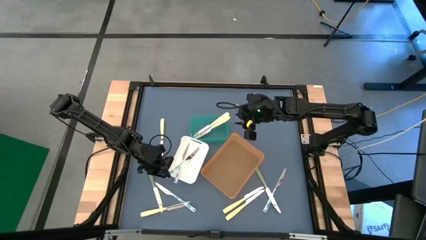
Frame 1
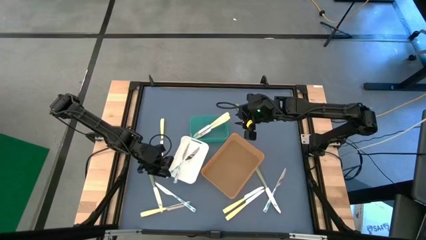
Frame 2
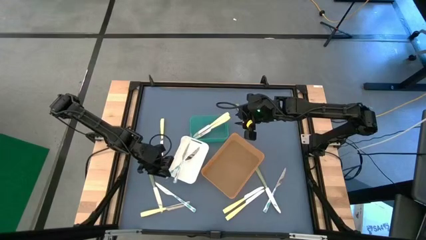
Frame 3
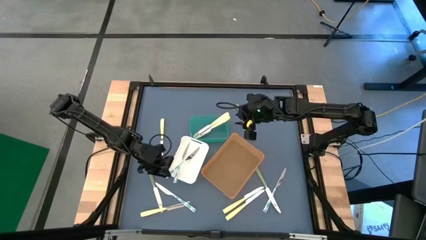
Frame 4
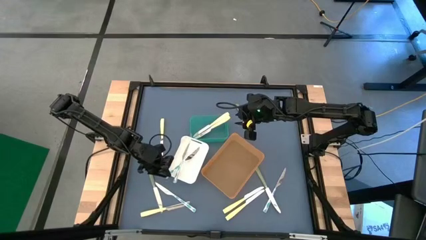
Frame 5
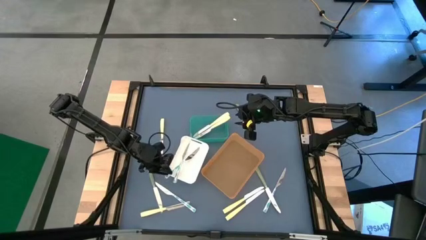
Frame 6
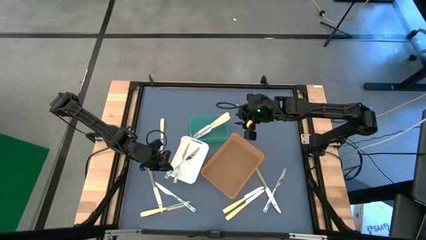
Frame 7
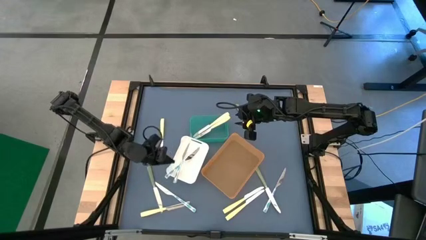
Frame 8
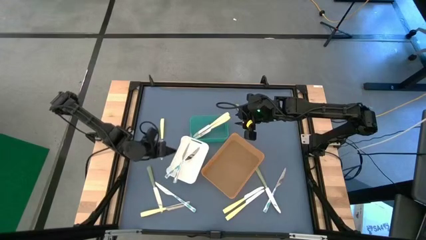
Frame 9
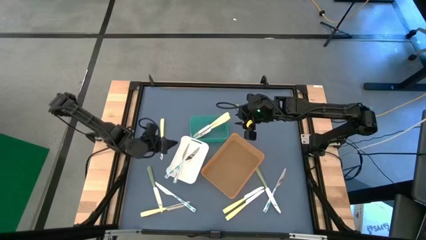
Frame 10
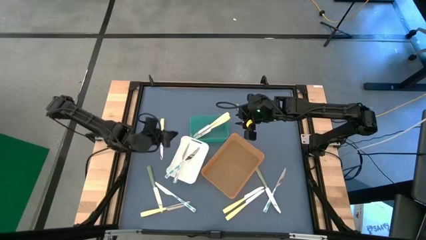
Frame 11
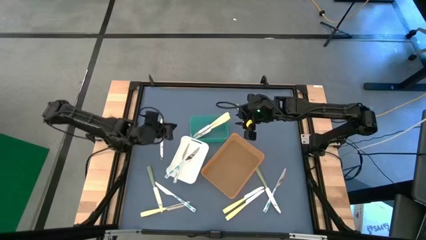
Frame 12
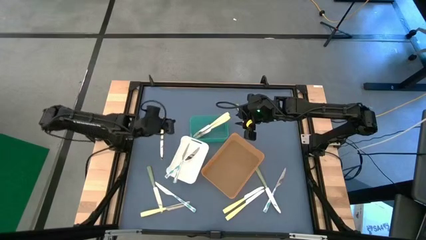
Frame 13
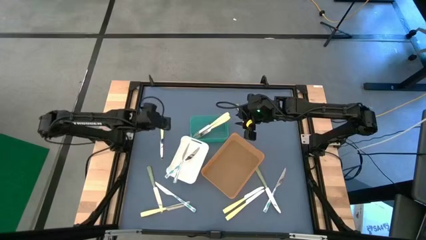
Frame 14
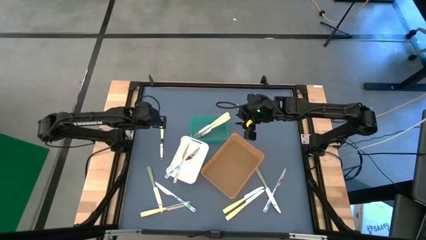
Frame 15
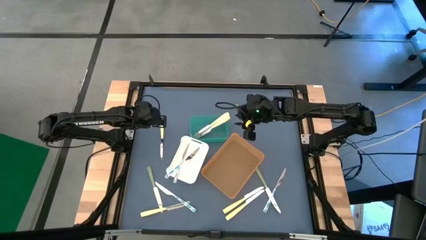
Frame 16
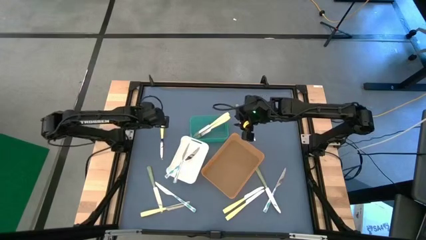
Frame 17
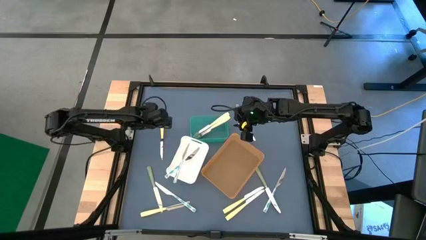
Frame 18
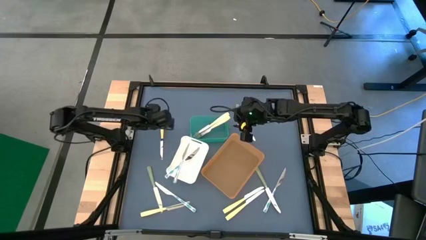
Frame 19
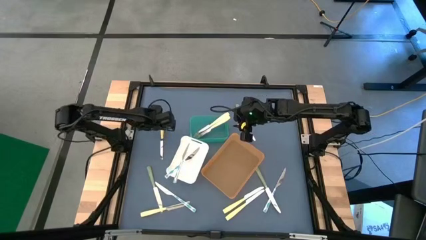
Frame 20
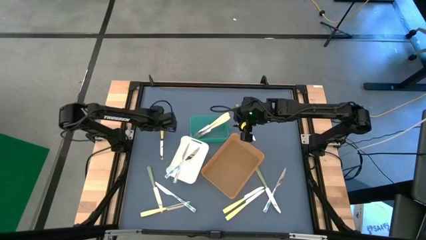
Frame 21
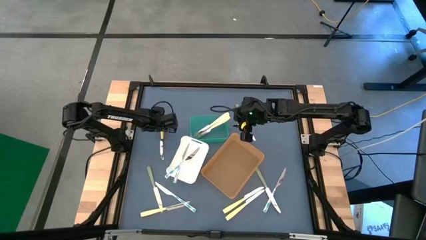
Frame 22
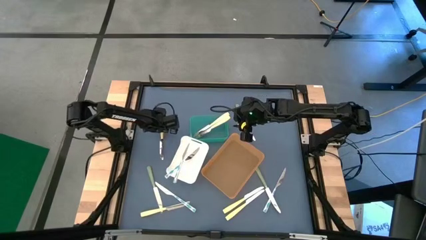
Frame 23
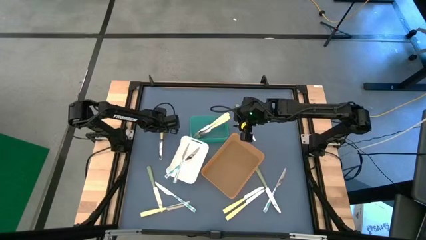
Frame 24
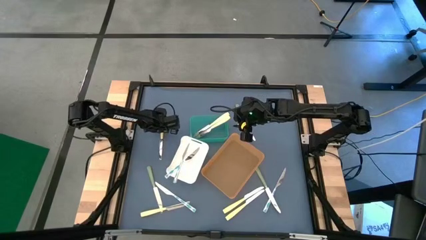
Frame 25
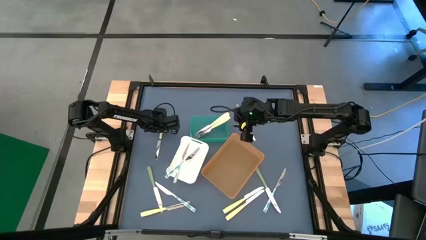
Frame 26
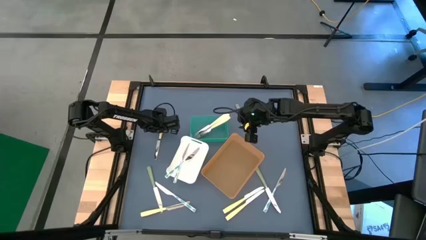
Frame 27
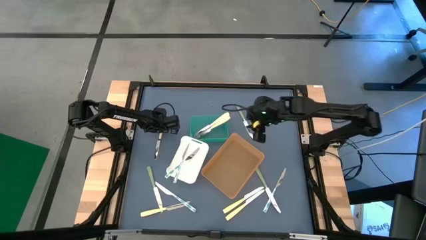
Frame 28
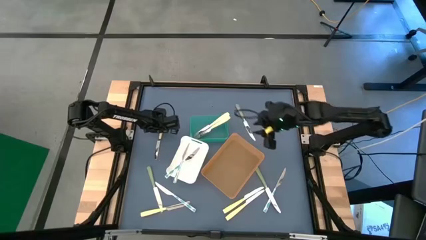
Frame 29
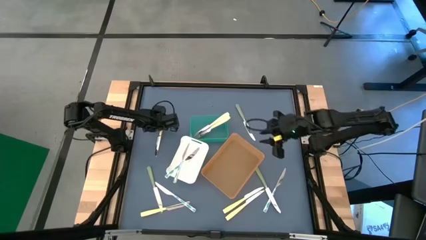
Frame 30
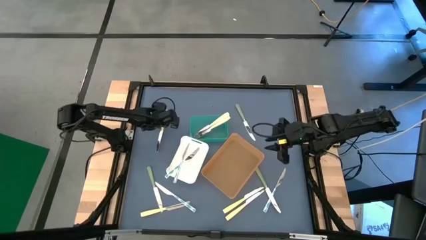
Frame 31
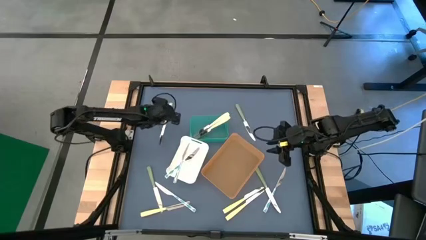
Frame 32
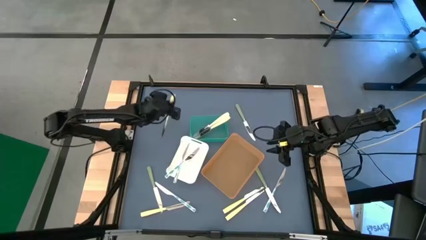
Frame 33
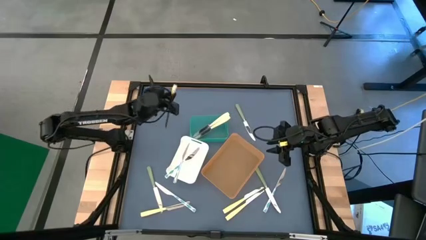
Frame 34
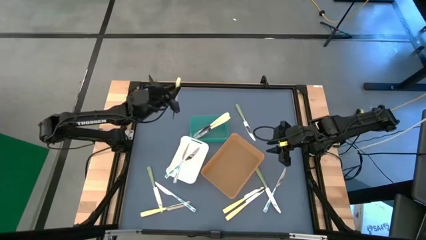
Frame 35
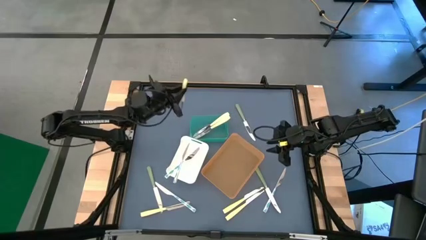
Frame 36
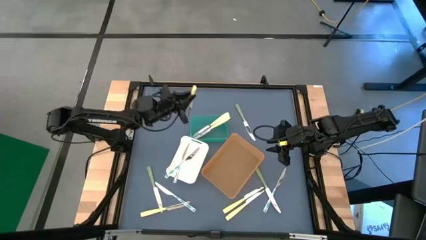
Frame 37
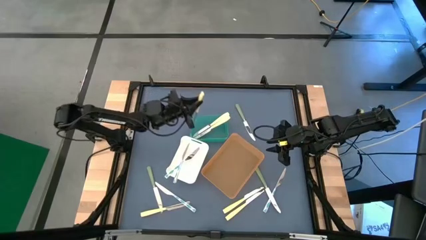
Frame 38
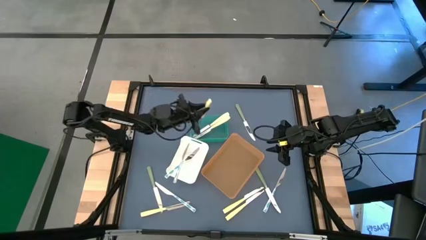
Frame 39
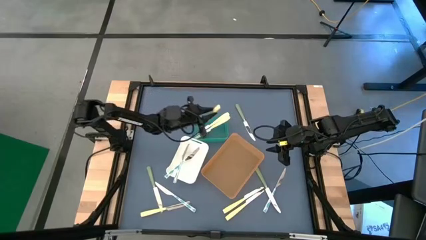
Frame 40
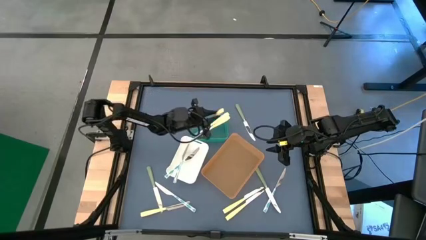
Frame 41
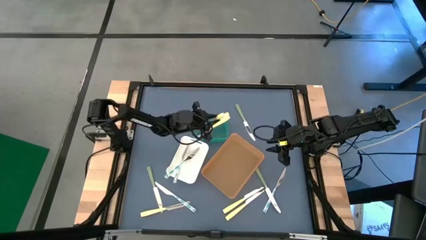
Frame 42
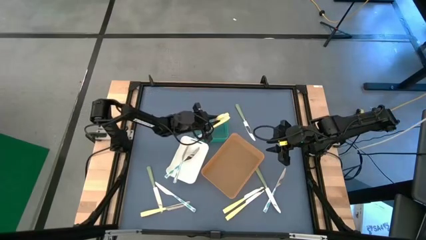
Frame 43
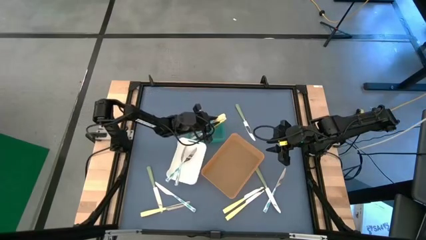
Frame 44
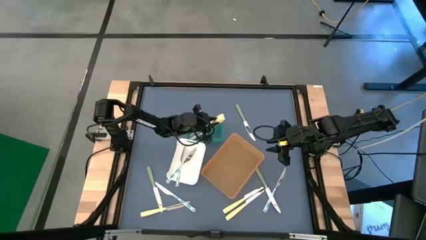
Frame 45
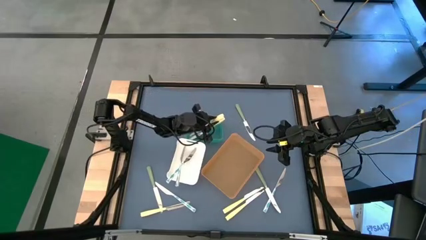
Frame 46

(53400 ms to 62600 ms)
Task: Sort silverware by color (type)
Put the yellow knife into the blue bin
